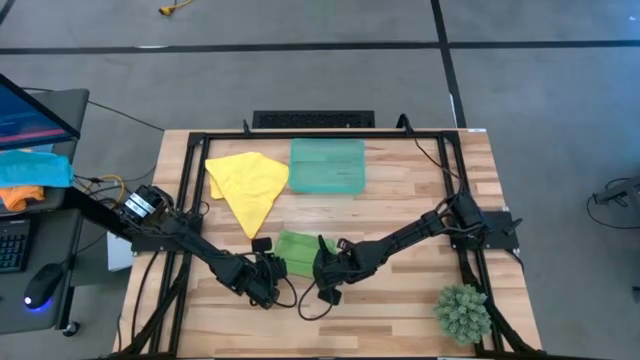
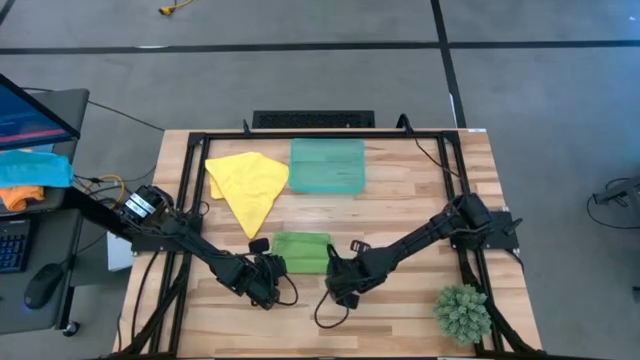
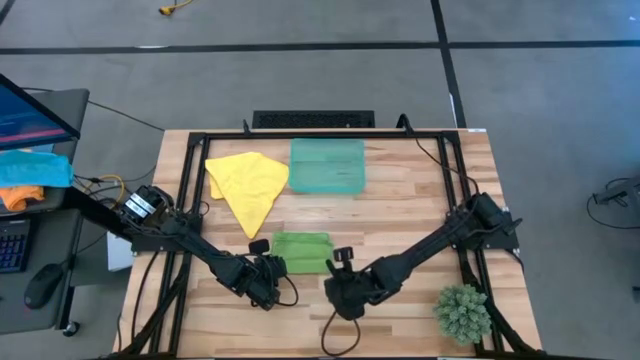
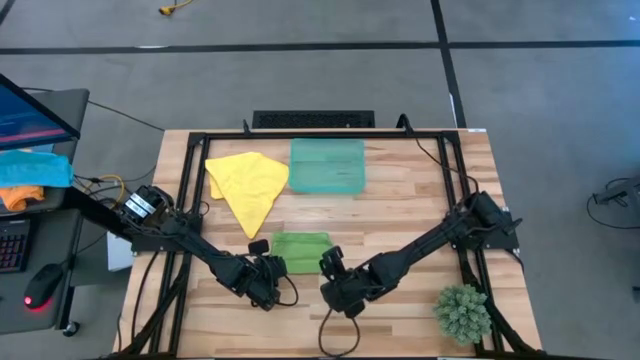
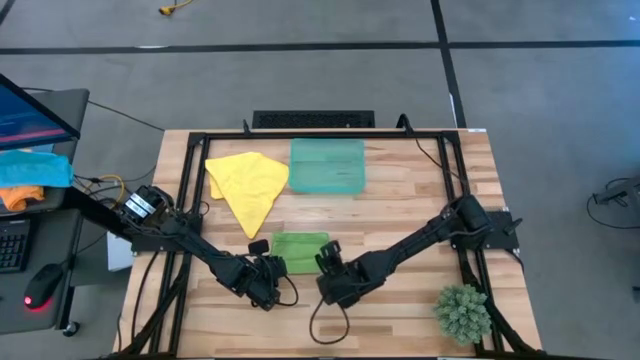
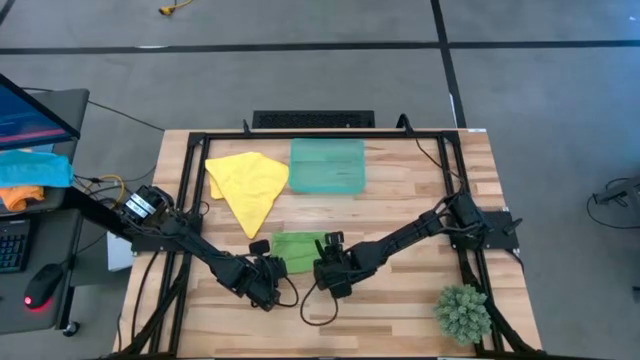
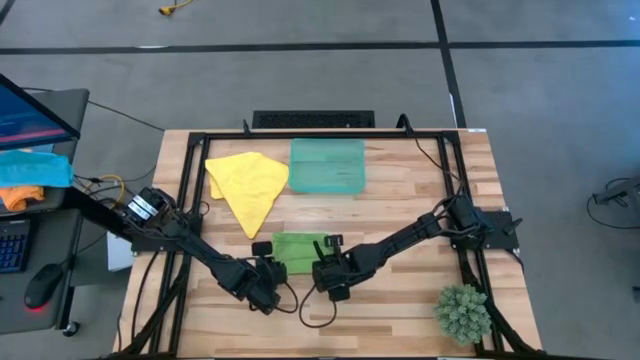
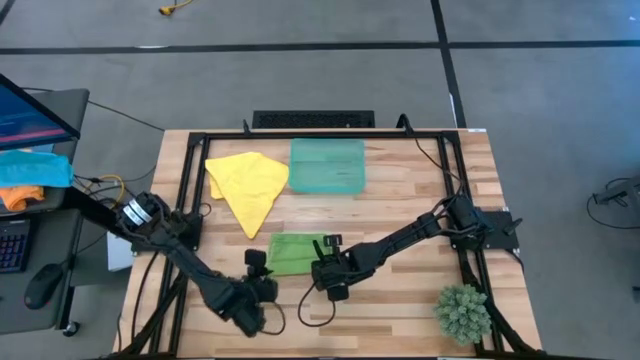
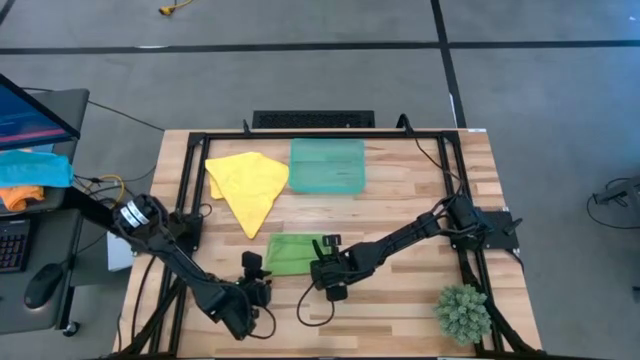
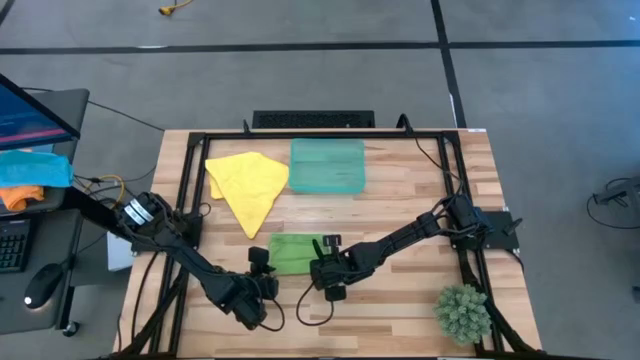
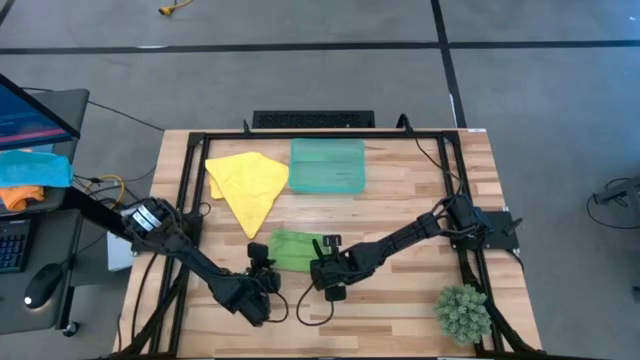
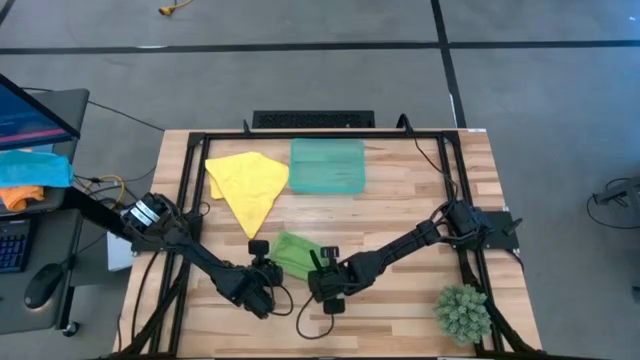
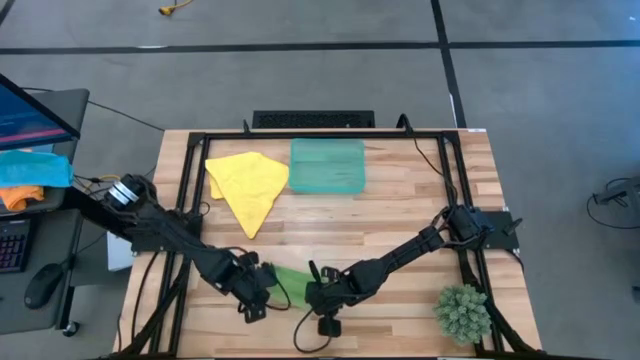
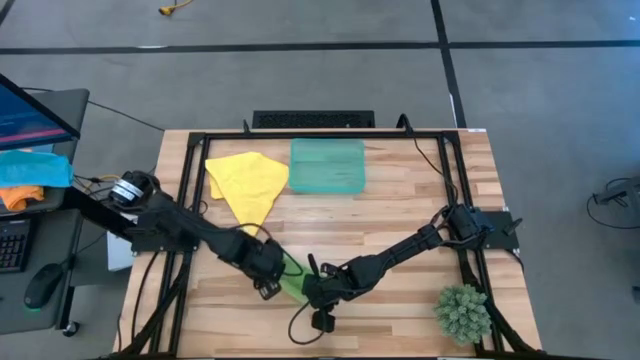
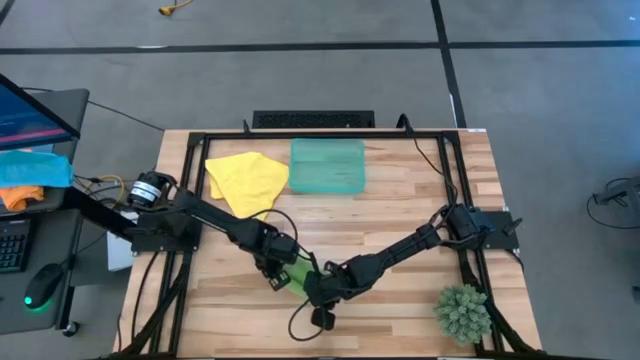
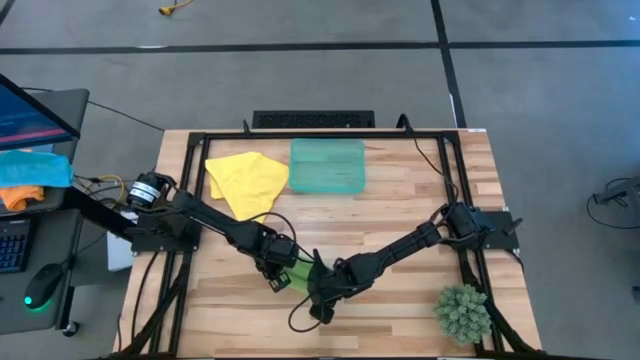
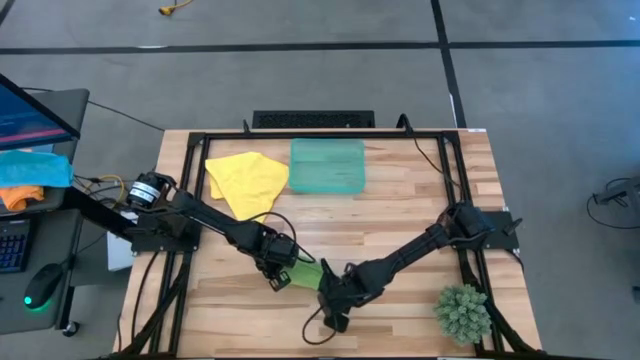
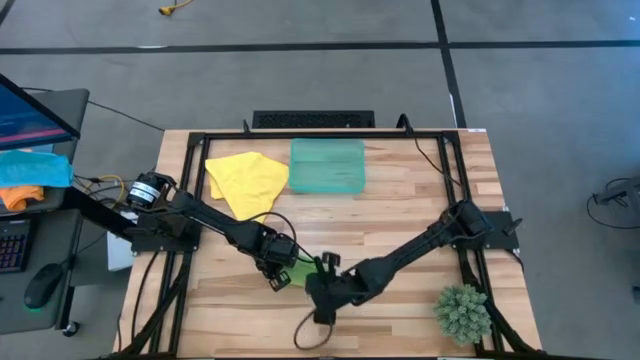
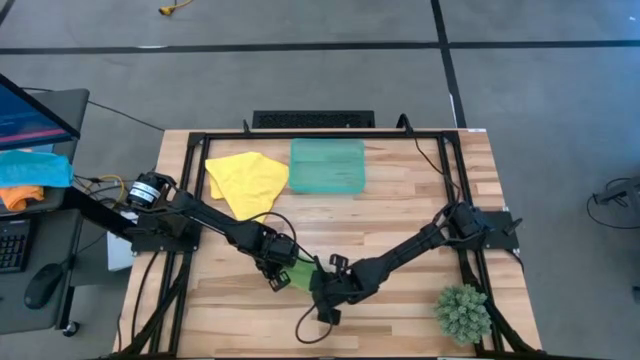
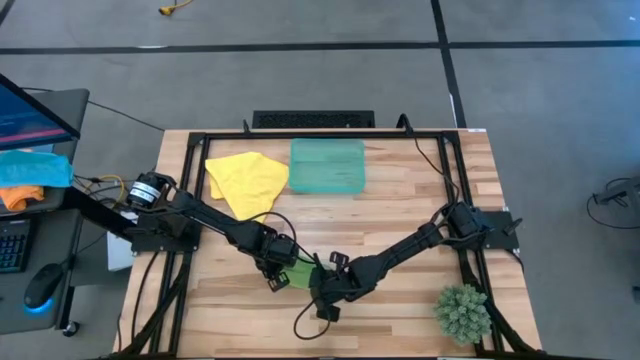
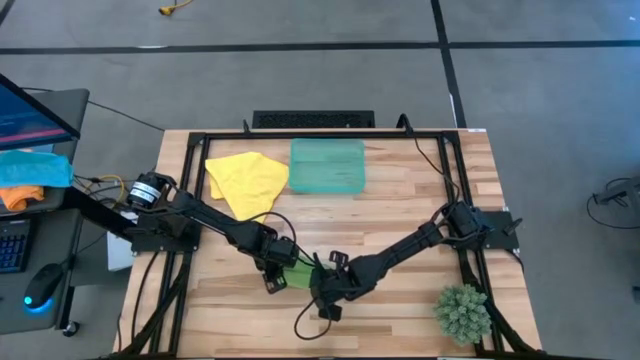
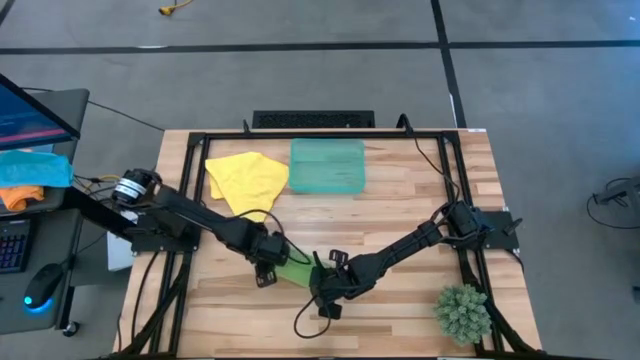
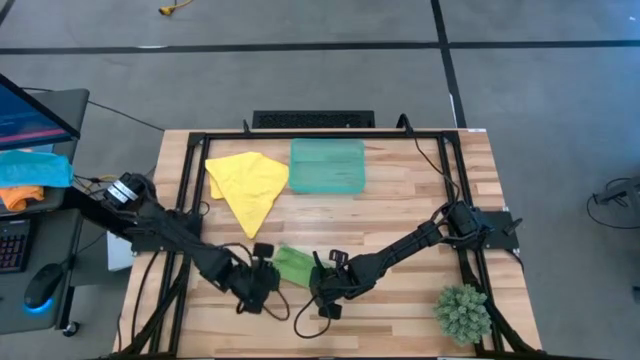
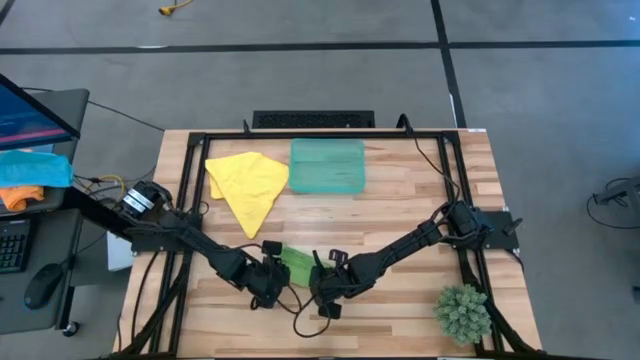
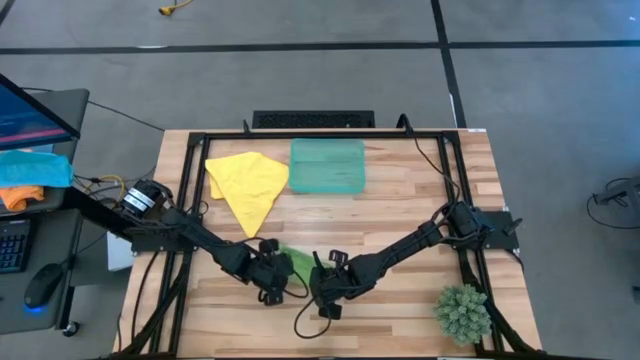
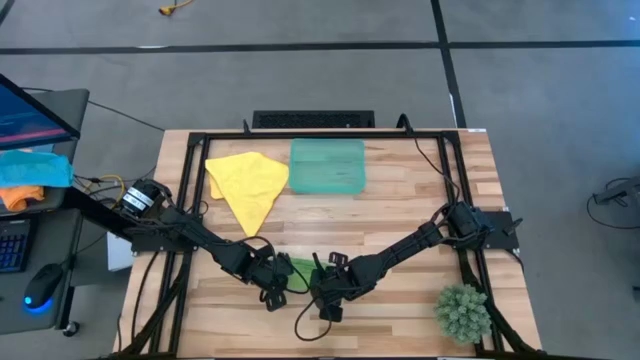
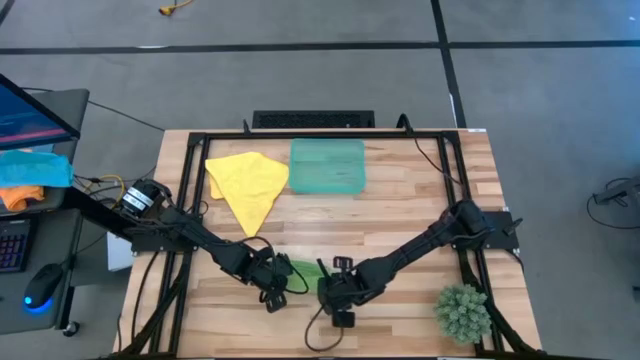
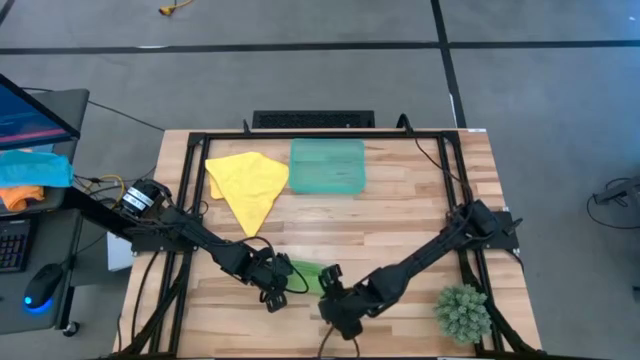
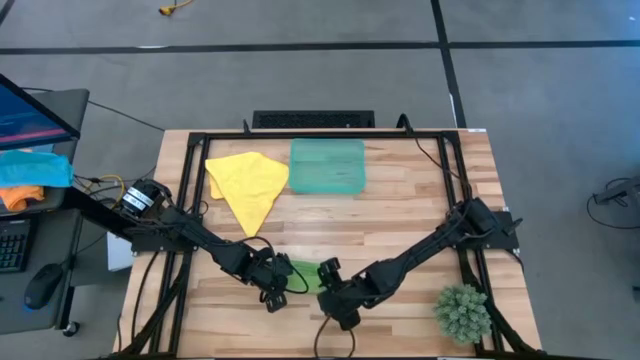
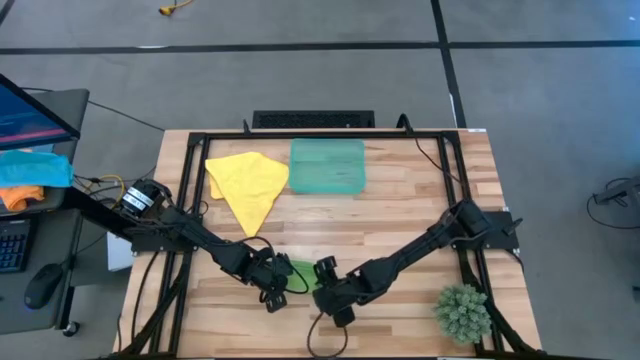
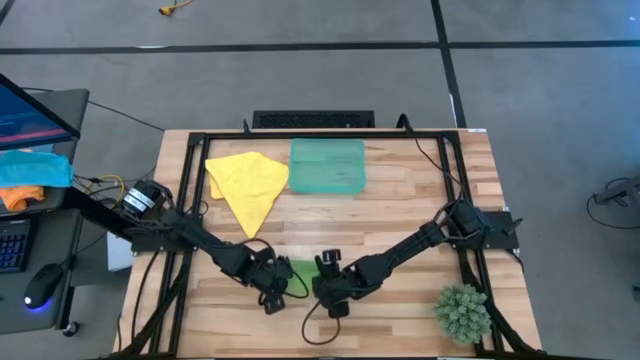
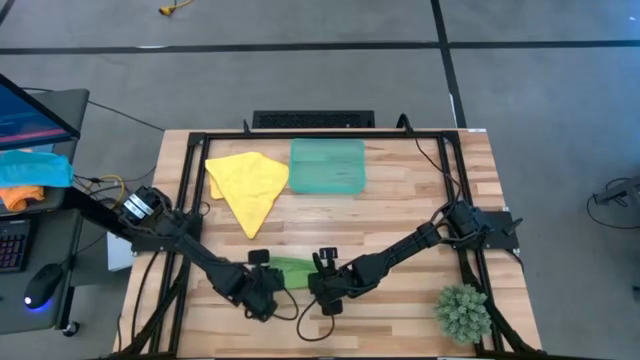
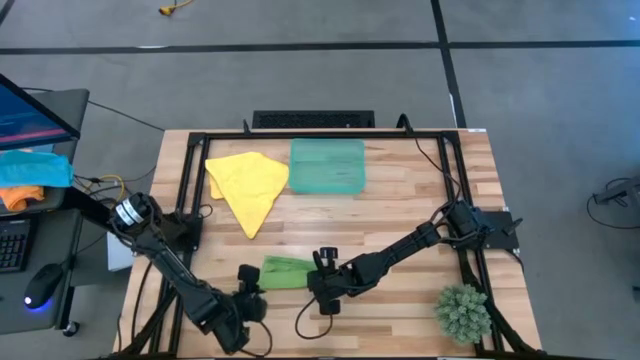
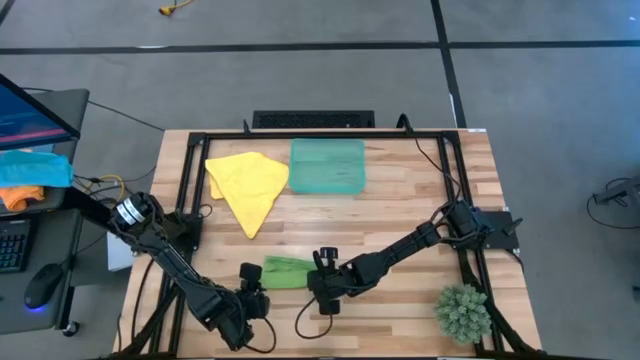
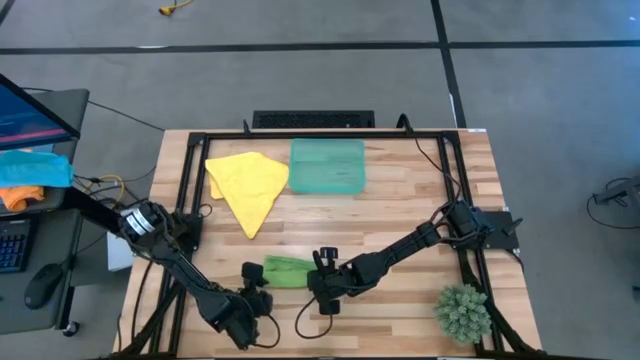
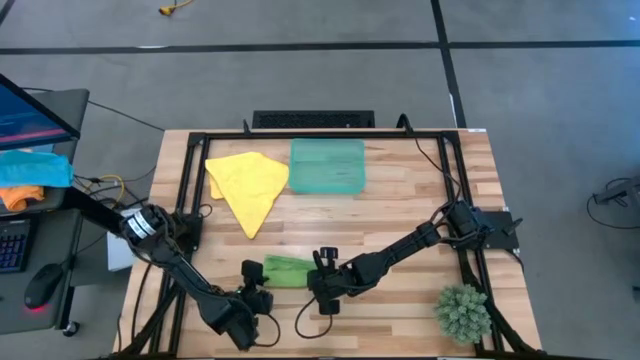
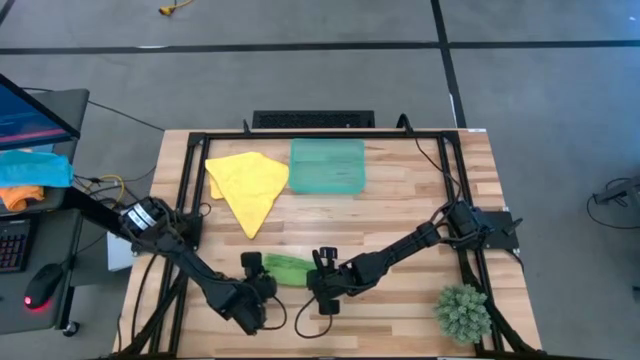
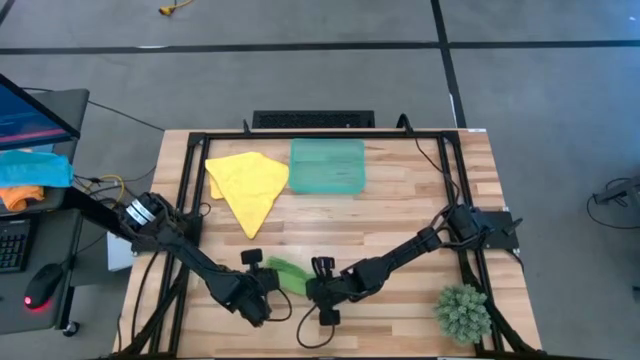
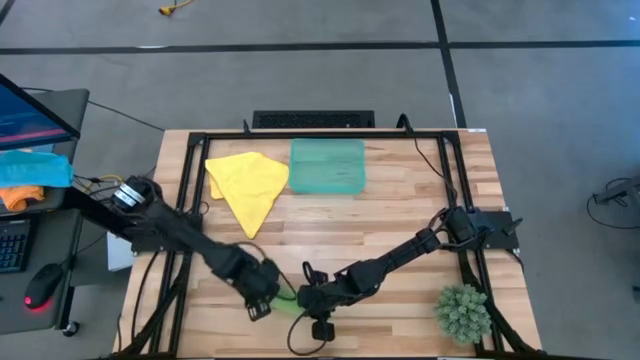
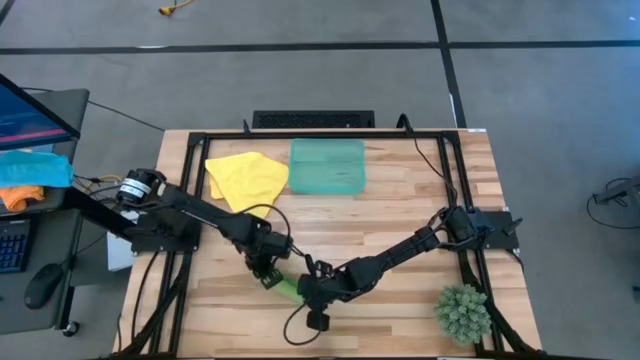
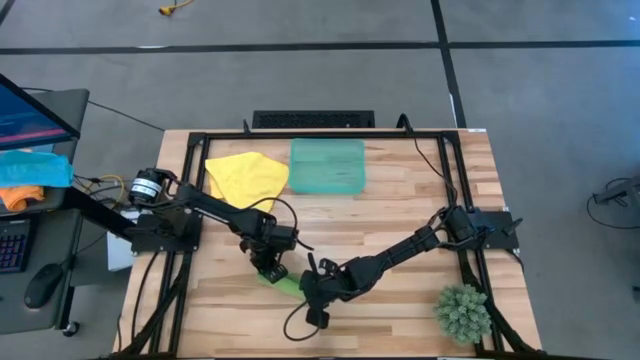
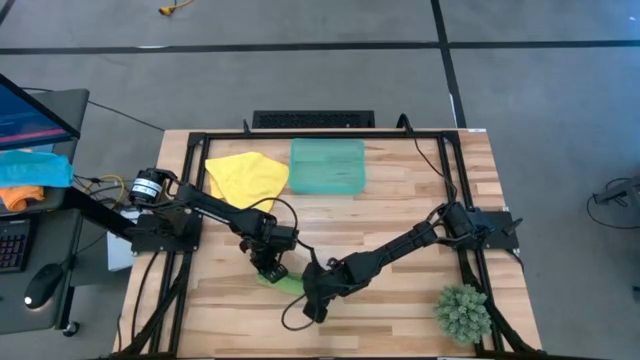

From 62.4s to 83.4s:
Task: Roll microfiber towels into tight, uniform cylinder then place into a basket
Roll the folded green microfiber towel
